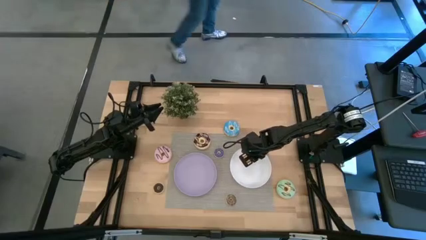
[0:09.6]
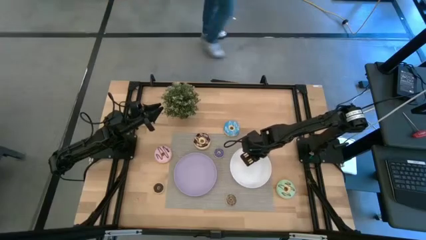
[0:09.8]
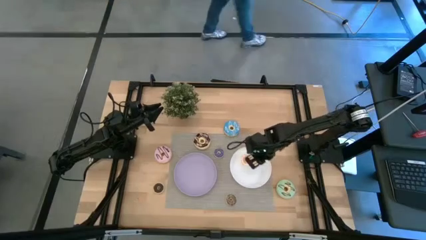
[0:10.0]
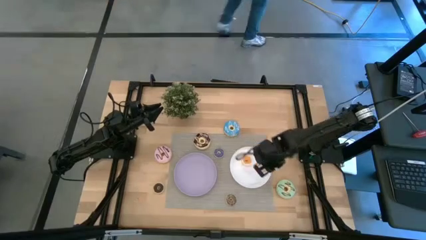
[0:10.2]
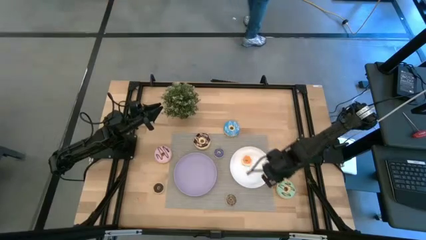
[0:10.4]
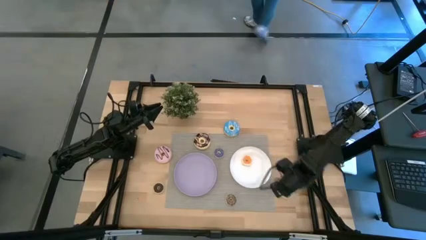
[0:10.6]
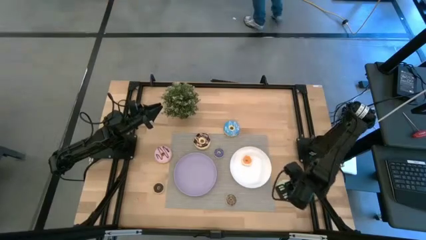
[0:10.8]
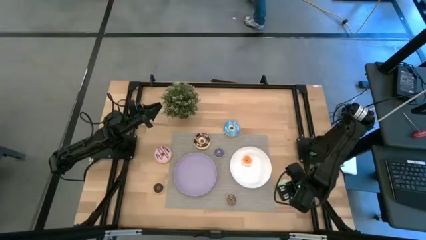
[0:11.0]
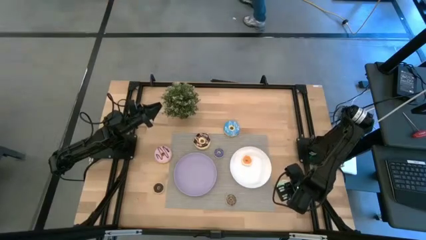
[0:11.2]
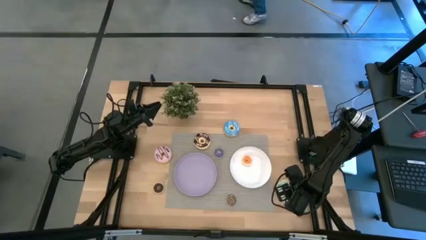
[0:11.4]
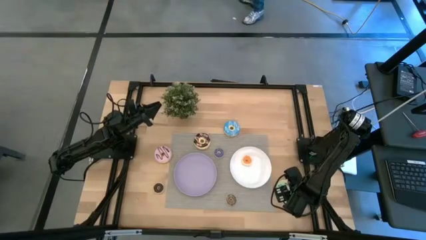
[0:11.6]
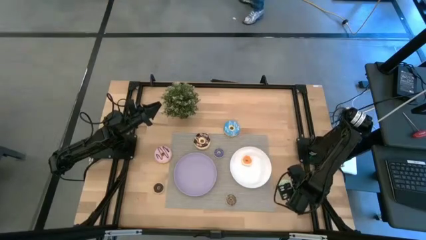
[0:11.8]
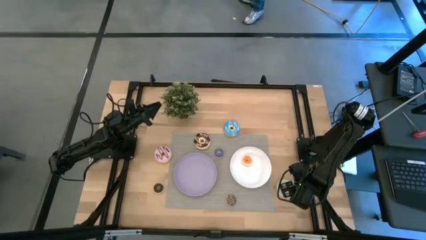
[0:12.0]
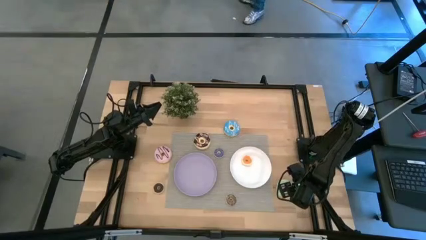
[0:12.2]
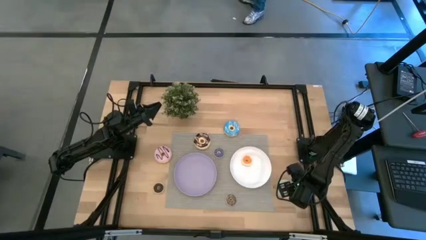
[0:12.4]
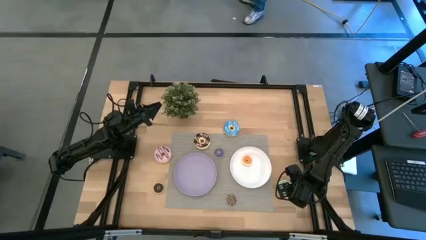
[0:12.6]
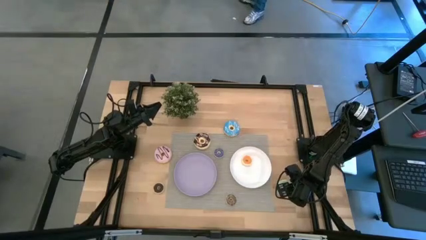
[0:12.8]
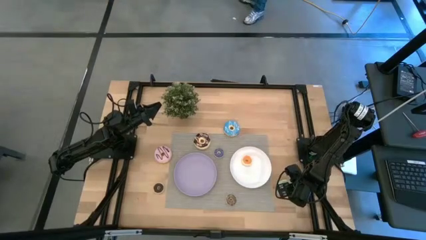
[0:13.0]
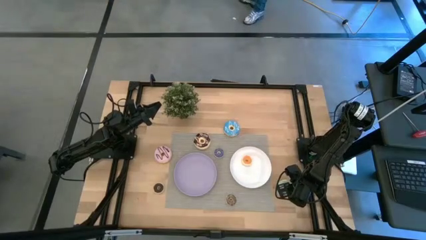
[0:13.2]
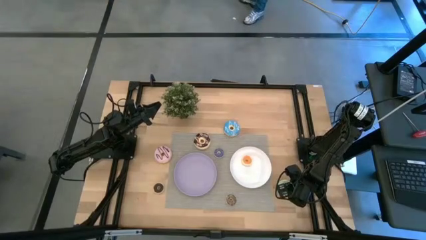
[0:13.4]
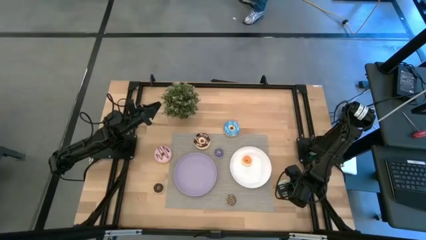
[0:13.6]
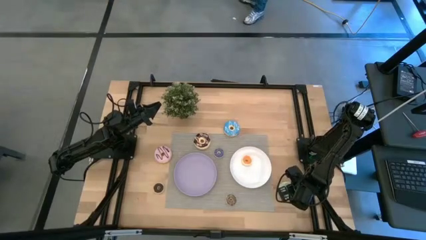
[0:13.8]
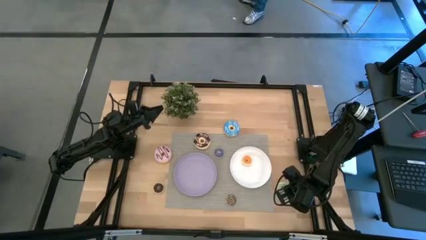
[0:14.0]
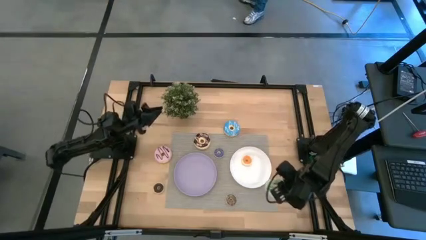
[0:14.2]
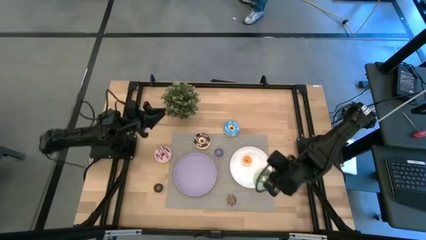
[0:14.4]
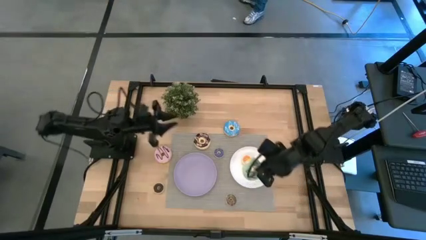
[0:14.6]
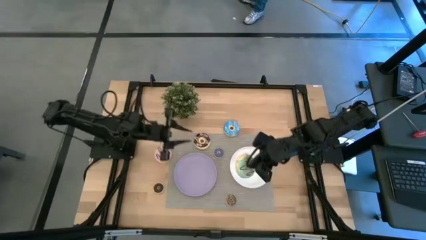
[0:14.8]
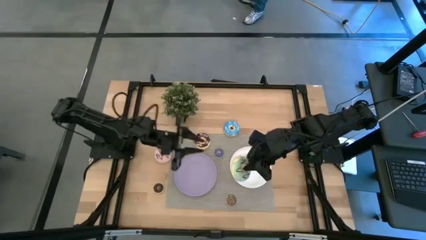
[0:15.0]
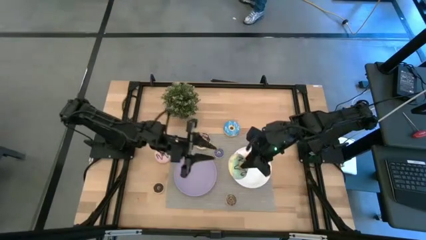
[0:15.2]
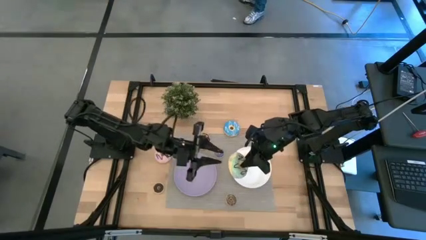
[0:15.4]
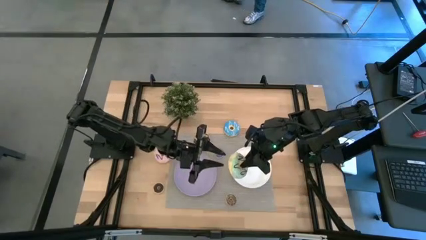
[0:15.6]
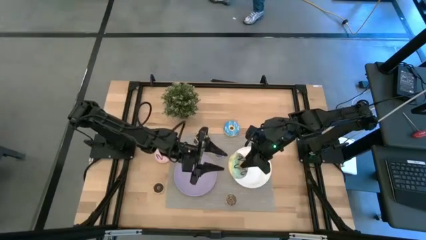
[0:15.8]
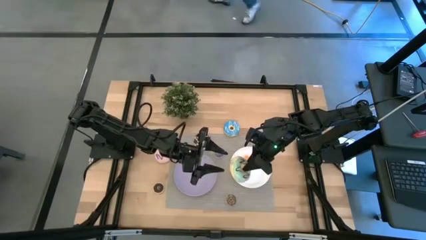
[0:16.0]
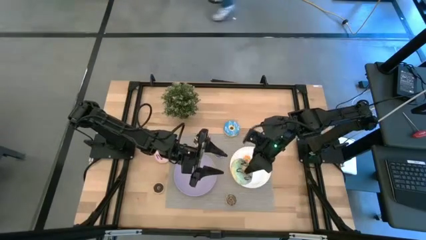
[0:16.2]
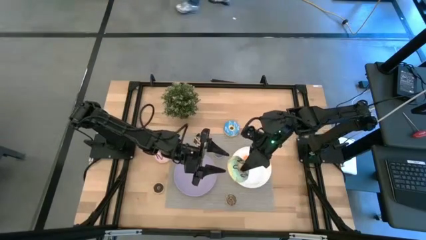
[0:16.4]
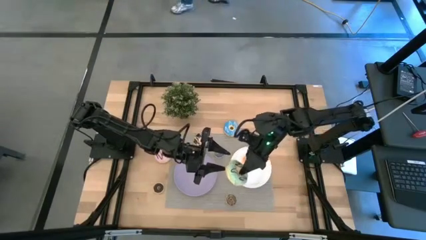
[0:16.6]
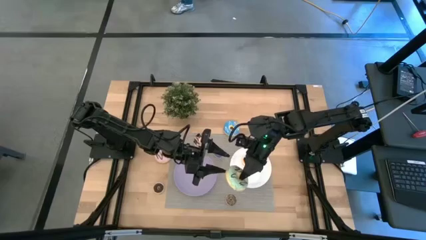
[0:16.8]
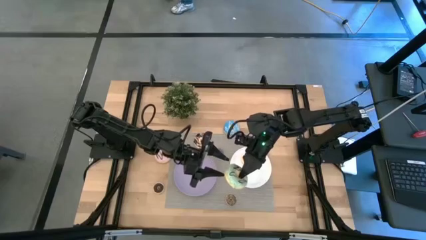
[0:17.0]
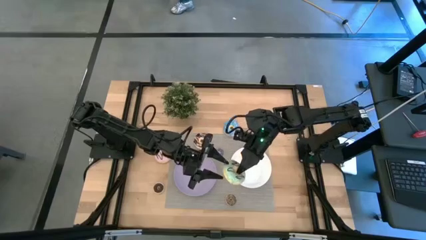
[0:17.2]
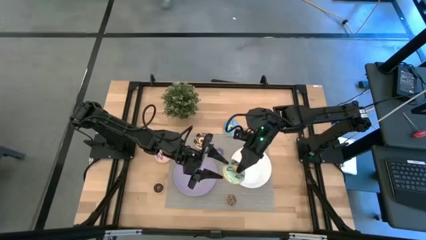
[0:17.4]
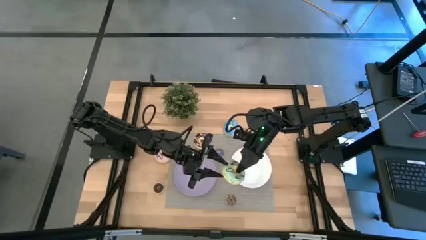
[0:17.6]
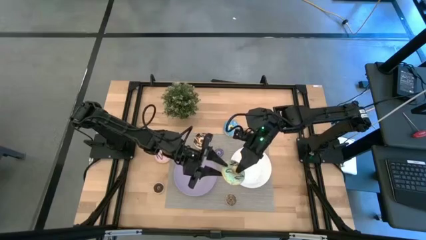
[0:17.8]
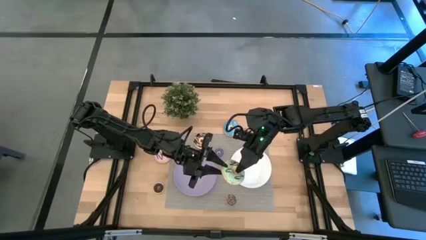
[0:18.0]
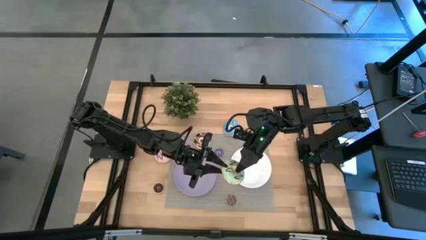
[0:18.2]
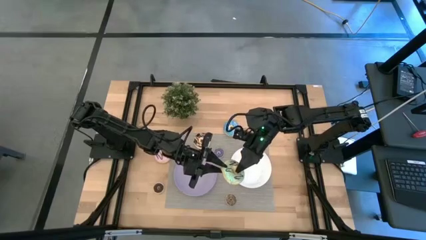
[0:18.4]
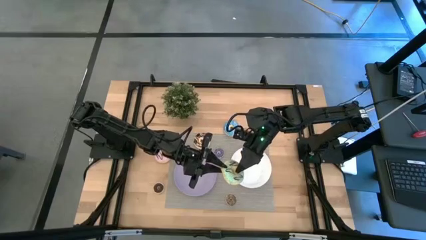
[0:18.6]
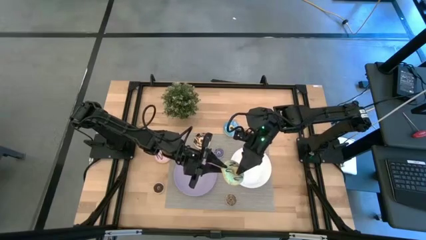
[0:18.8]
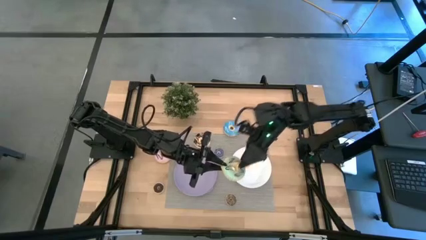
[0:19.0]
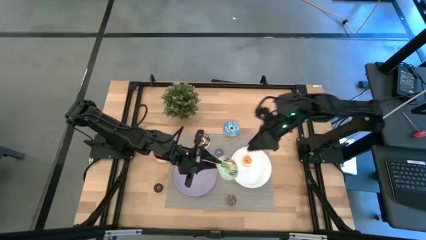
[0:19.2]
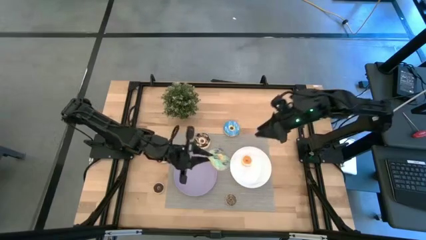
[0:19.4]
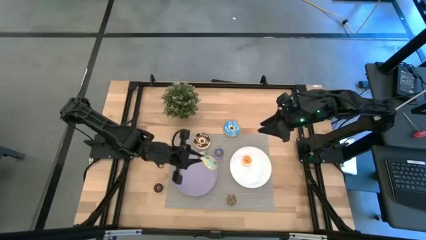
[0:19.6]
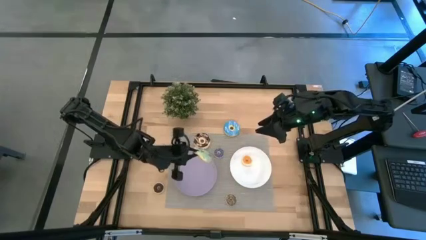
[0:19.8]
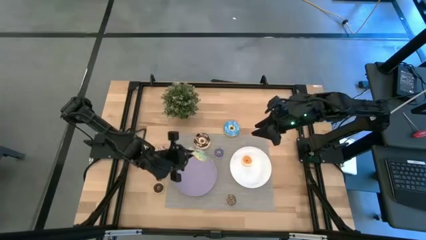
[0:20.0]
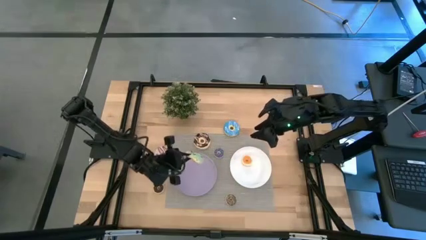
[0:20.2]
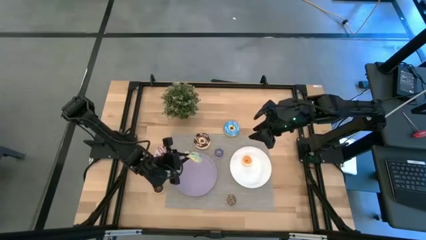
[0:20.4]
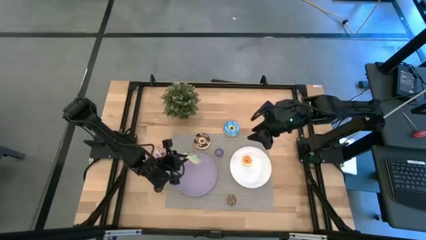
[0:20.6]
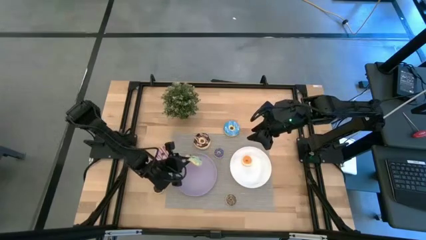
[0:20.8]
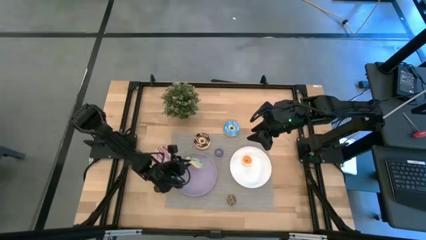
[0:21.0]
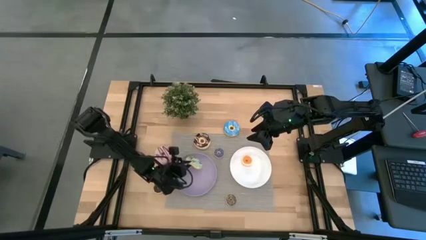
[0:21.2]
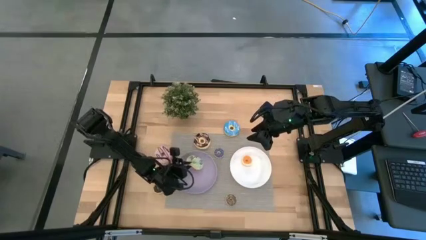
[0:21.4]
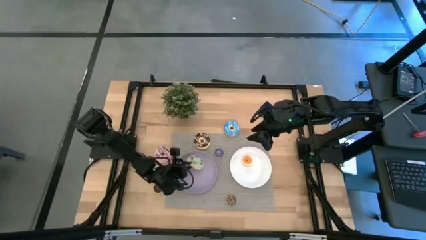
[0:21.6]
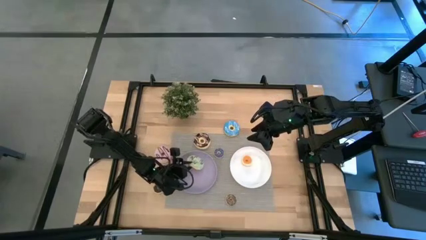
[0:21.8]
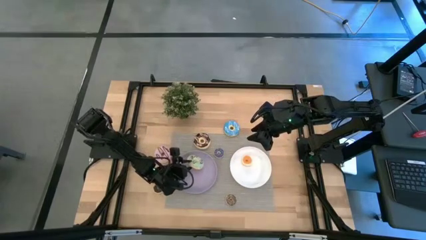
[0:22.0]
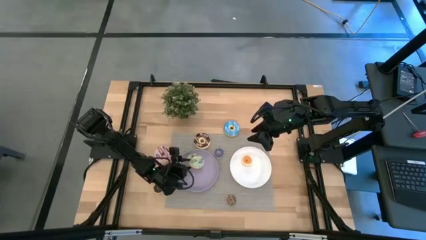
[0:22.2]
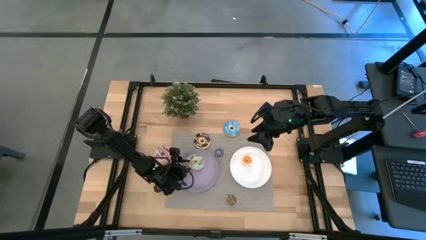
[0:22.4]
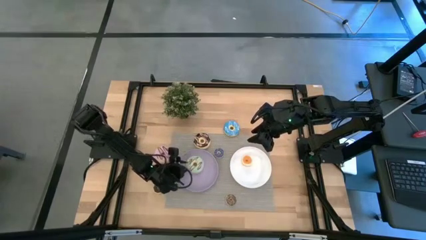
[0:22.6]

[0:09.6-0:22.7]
Task: Pick & Place donuts
Put the large light blue donut on the purple plate

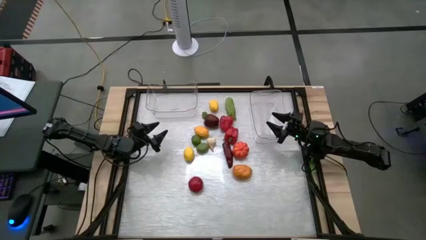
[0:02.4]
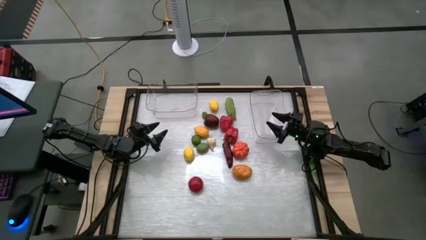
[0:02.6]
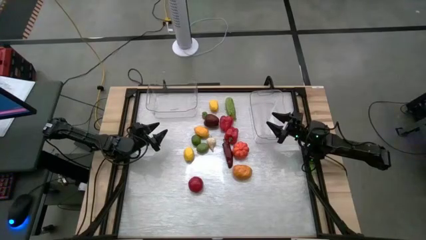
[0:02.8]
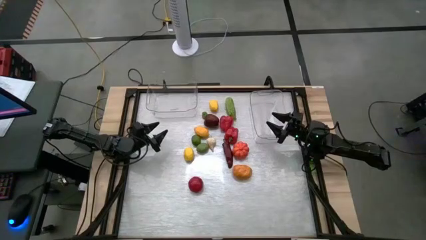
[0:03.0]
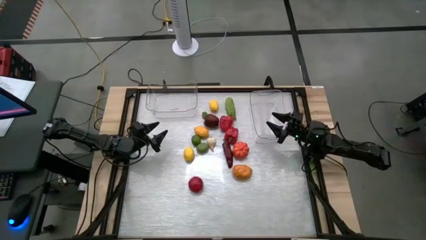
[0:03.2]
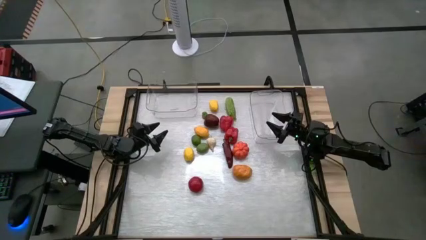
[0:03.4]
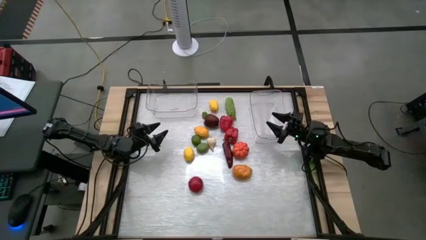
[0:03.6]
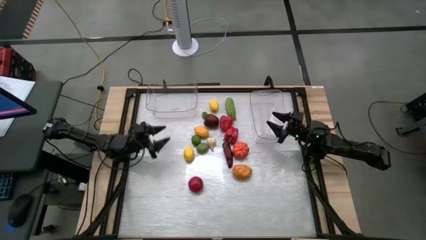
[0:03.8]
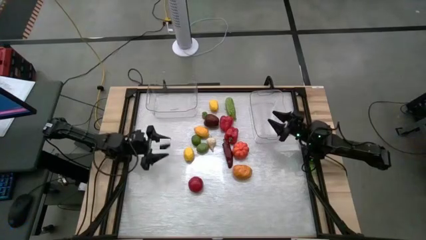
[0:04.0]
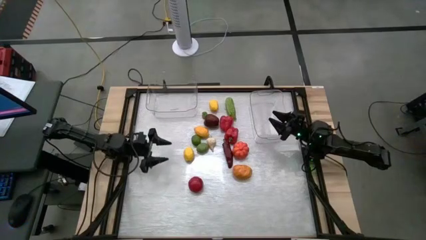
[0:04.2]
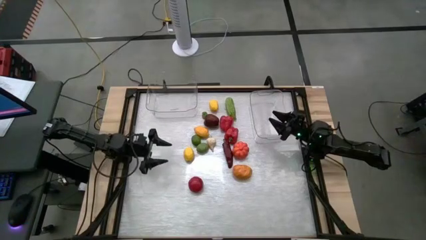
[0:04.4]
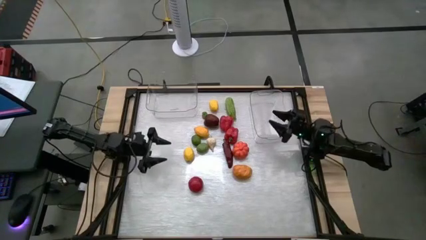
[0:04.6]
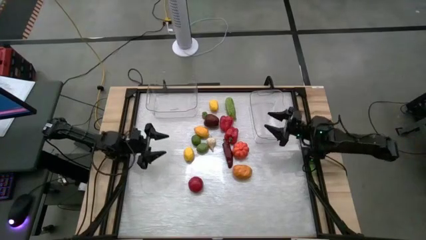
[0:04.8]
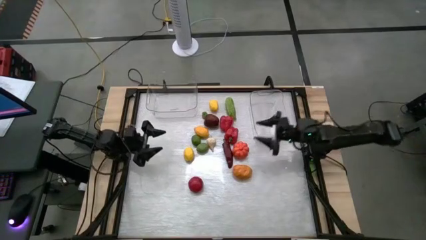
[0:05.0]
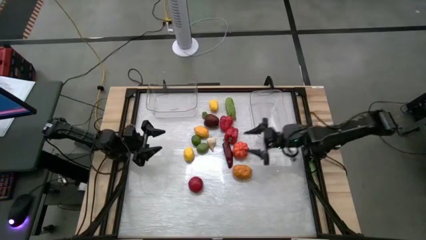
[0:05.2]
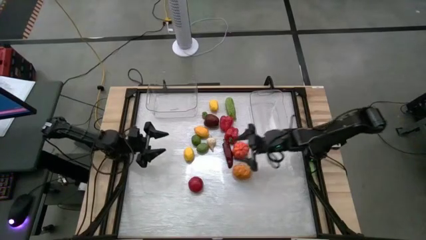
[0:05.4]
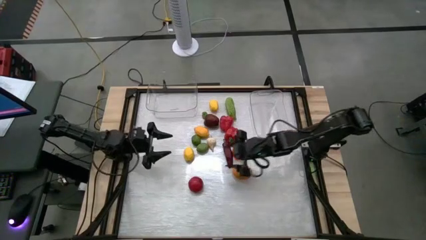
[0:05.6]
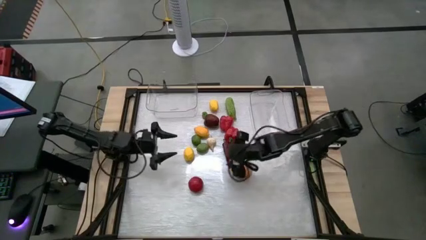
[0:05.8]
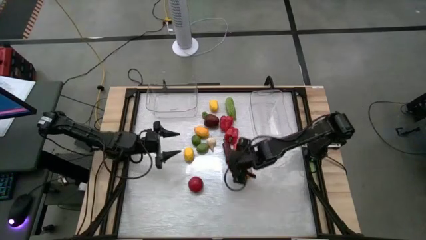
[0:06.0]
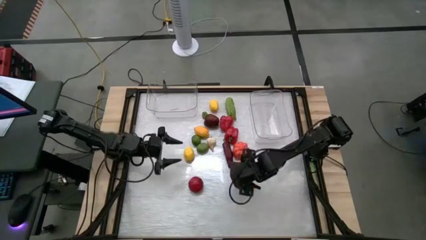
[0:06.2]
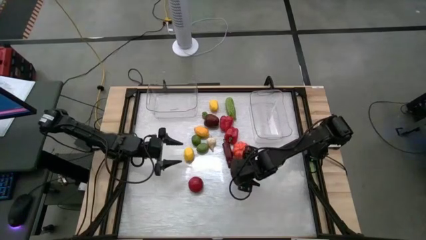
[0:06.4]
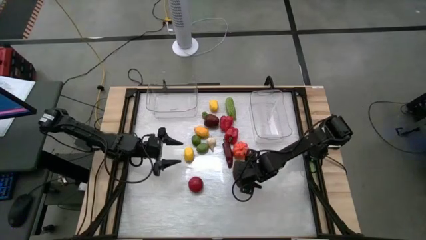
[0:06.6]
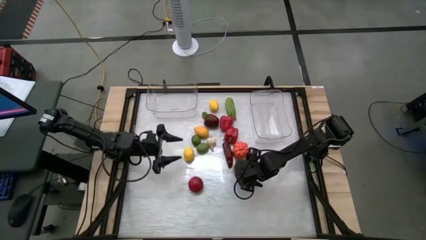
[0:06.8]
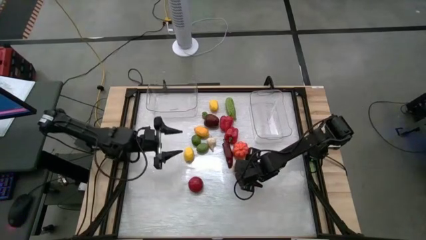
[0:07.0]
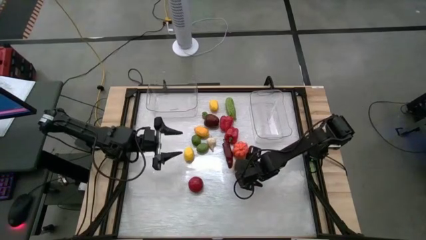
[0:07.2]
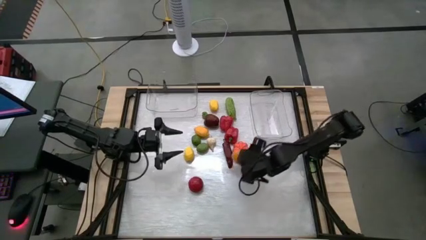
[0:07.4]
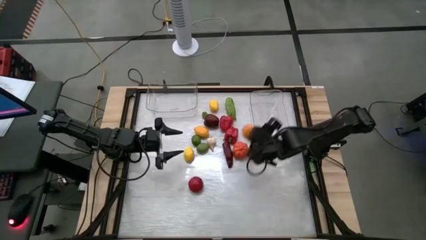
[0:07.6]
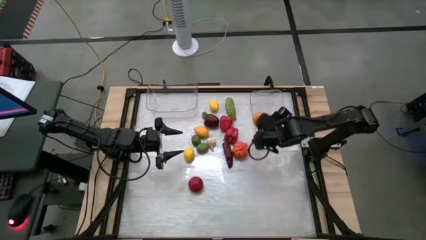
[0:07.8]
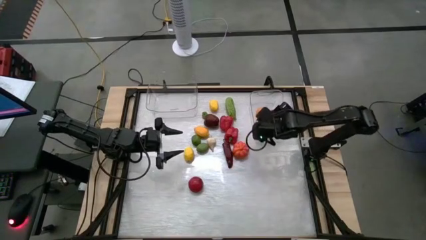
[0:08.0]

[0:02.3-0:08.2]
Task: Sort produce into baskets
Put the brown potato into the right transparent bin
